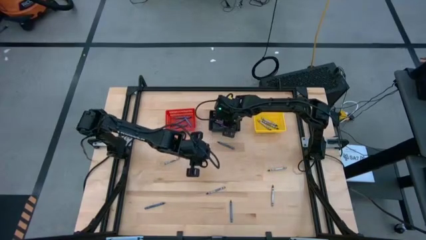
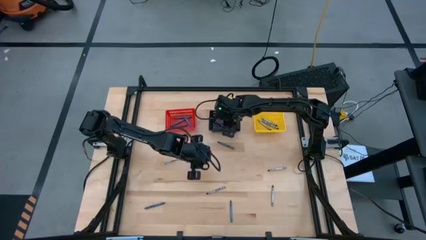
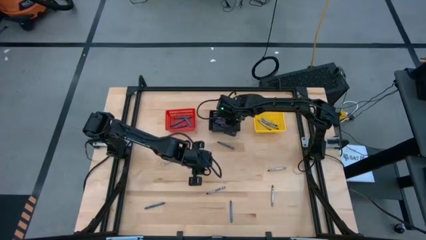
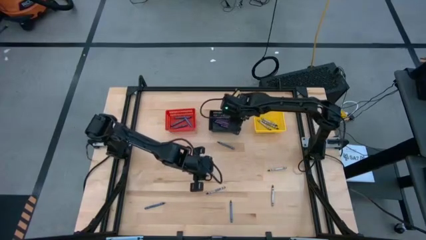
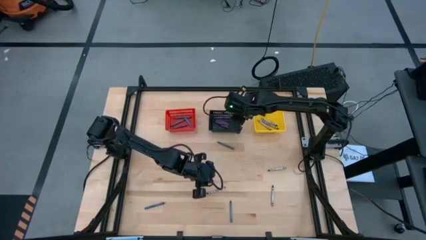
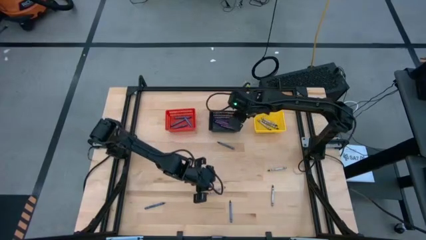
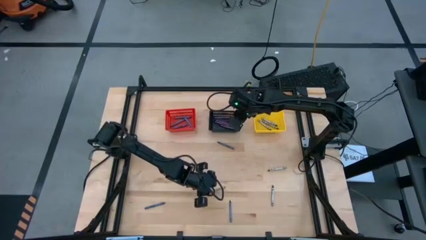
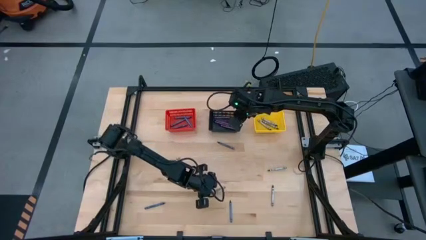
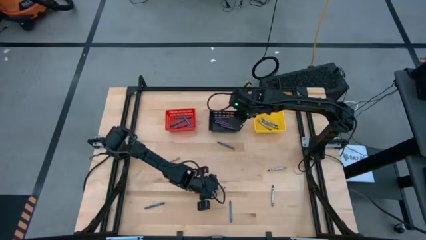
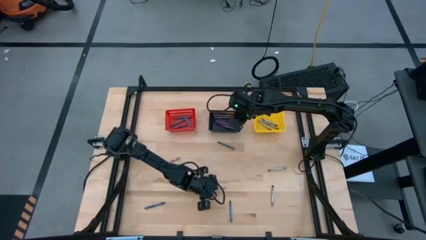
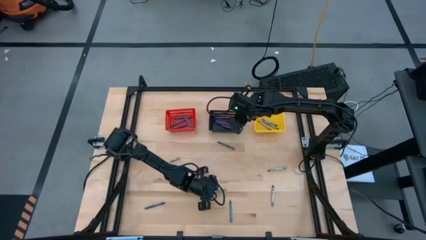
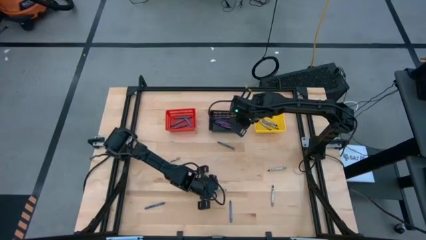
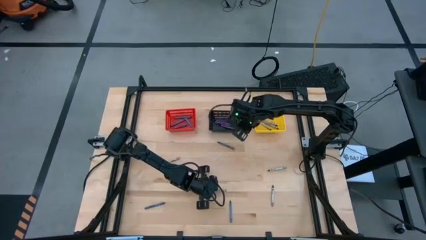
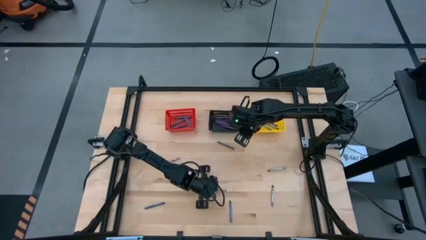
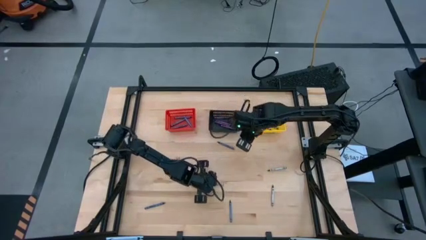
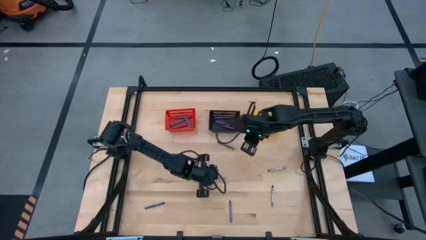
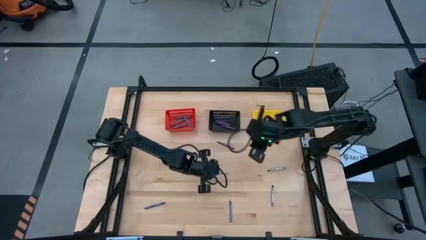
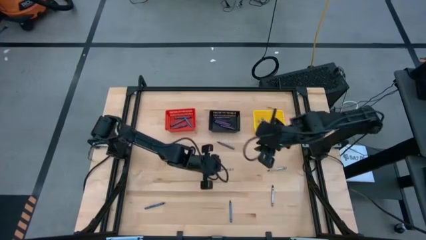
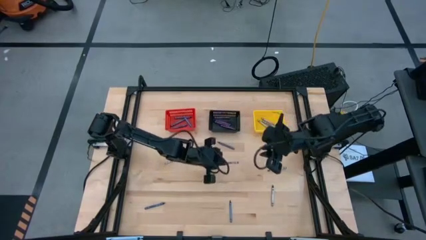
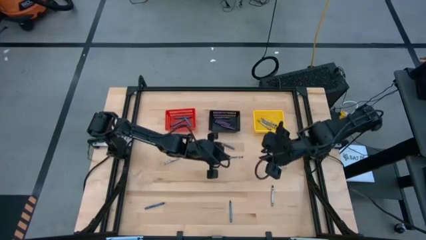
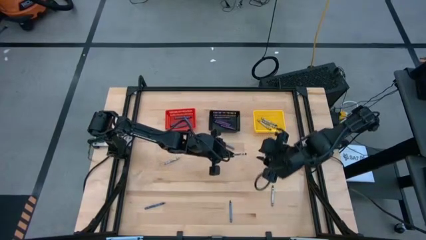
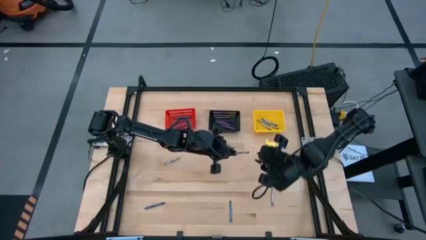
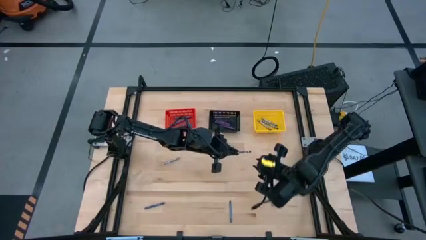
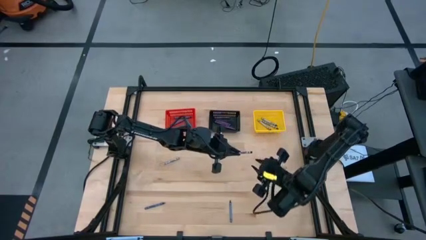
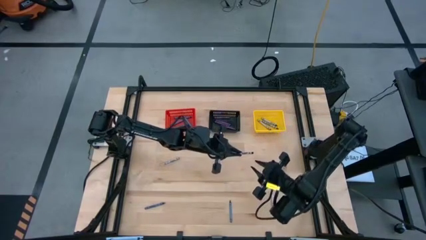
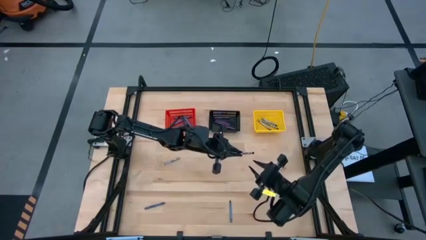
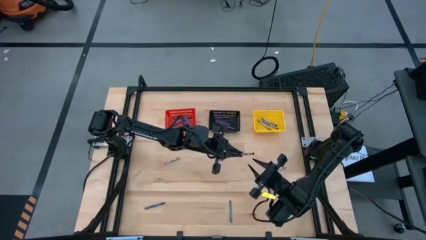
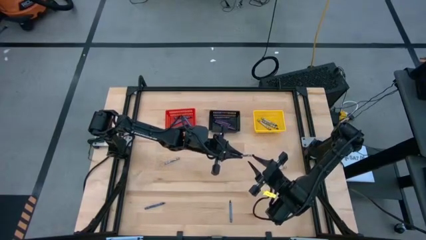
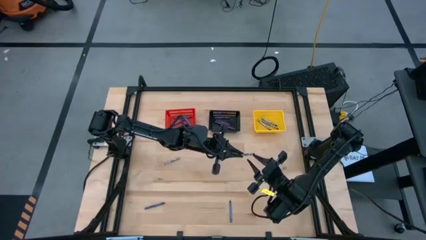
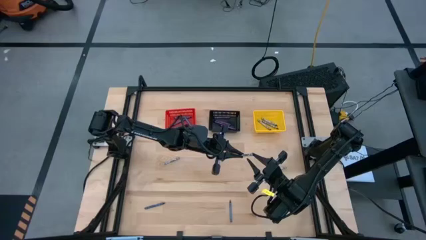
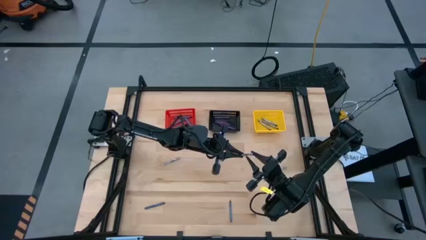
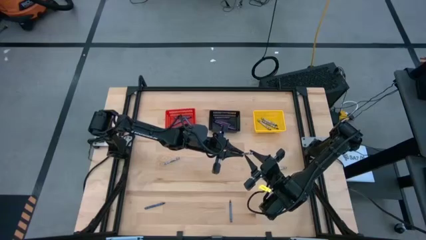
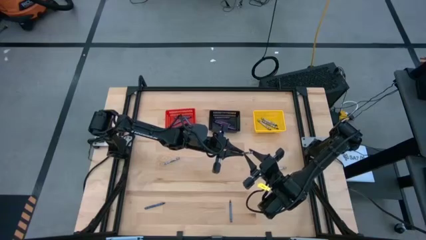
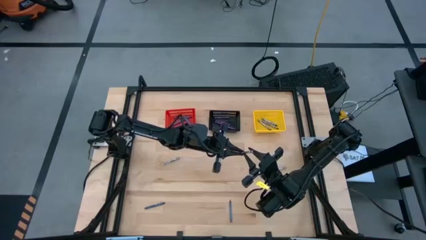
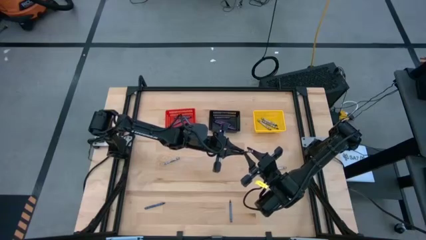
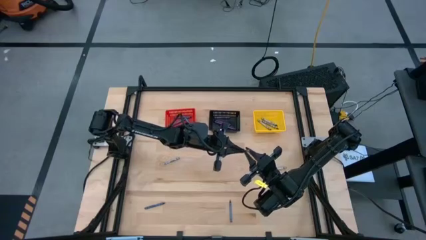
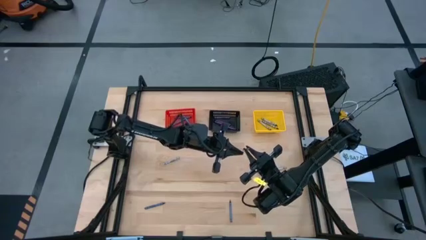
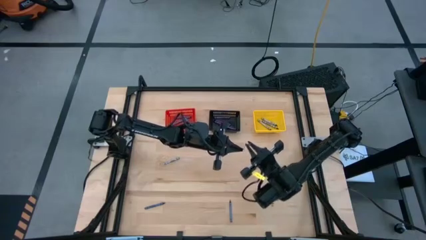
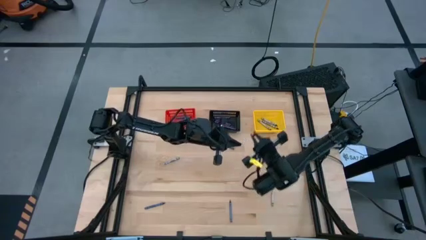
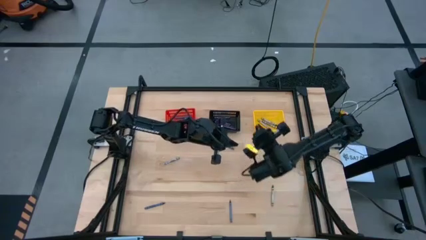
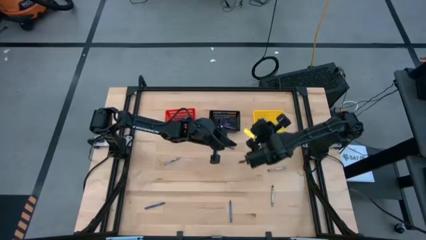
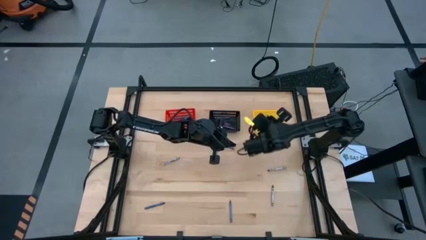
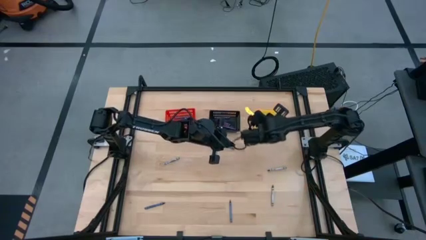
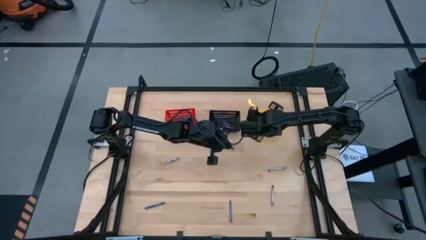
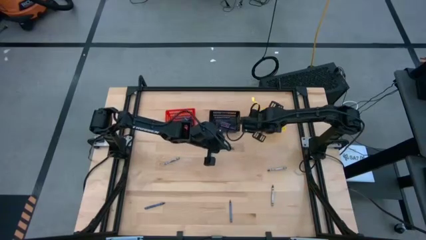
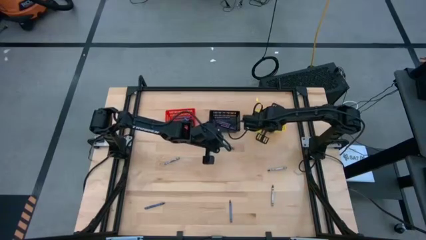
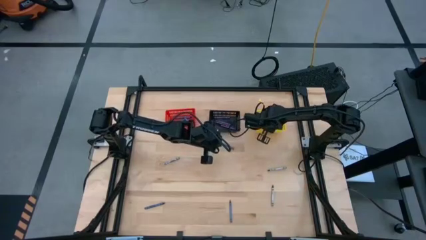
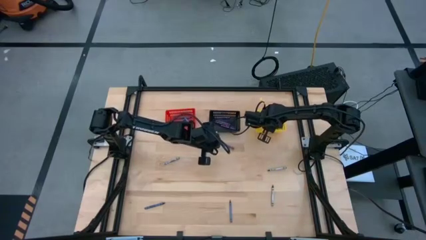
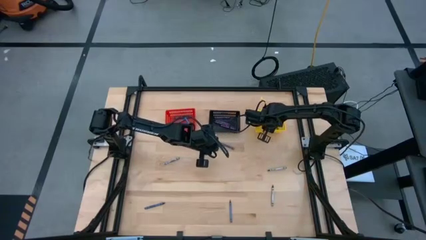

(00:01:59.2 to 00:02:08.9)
Task: Sort crayons
Put the black crayon into the yellow bin

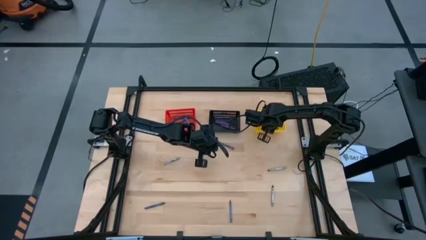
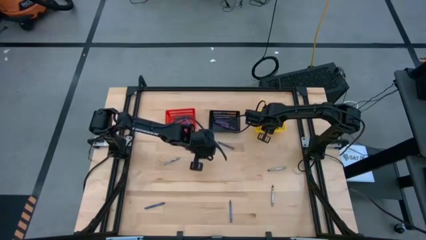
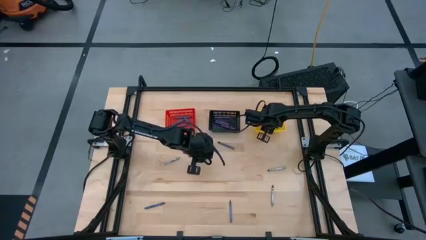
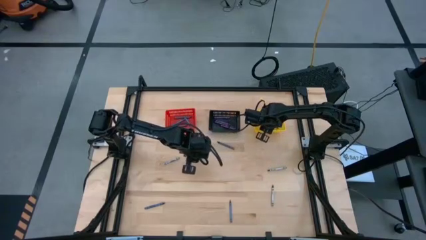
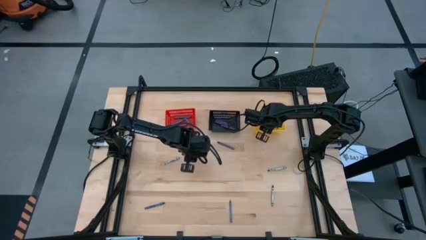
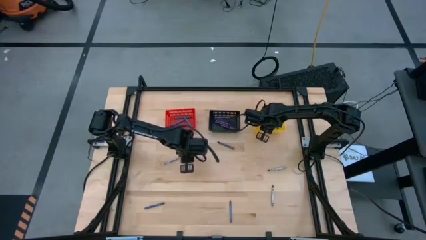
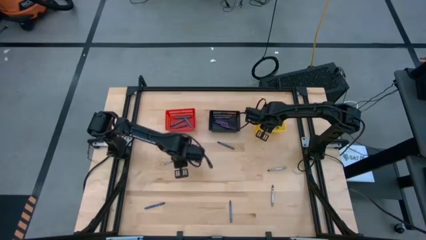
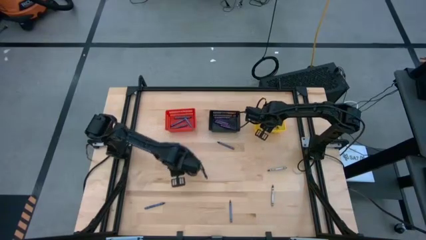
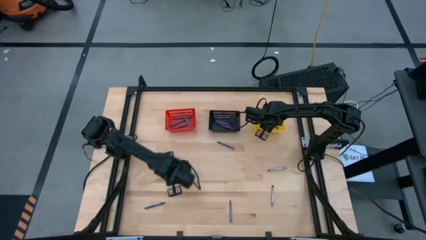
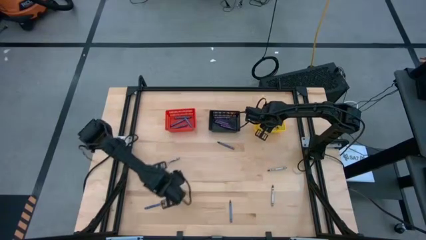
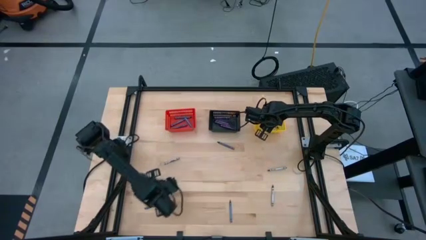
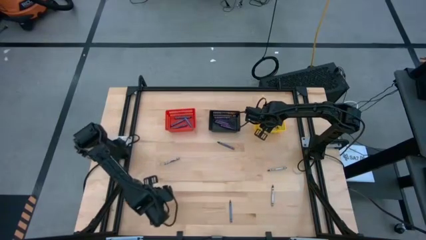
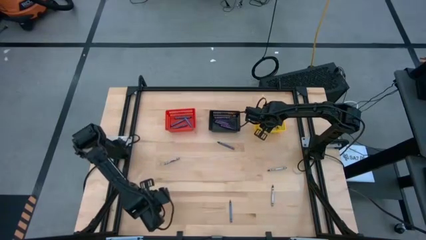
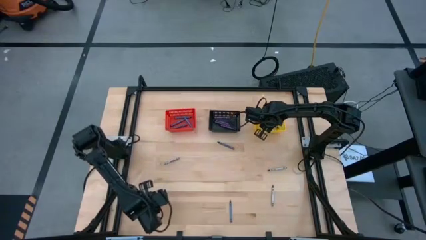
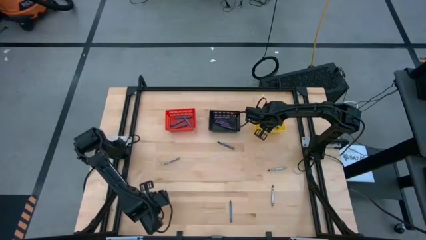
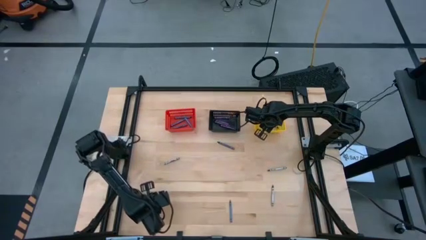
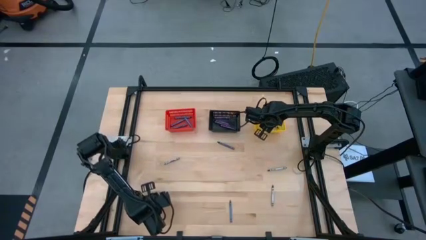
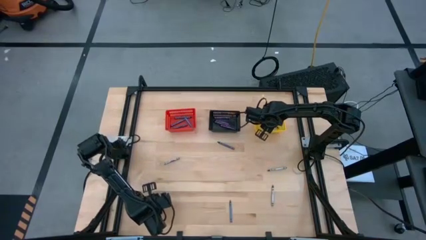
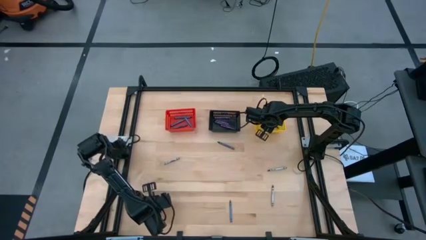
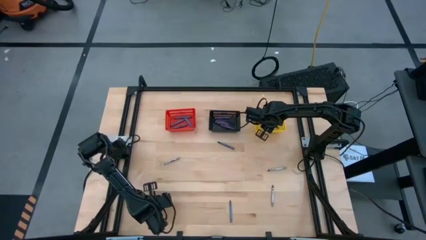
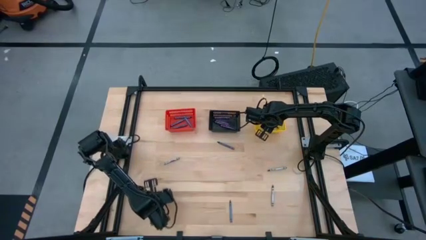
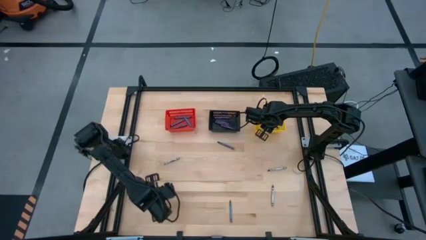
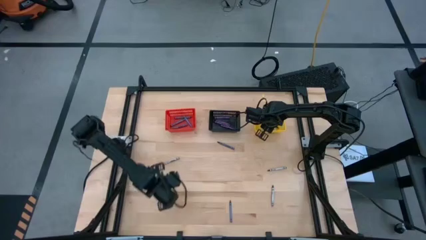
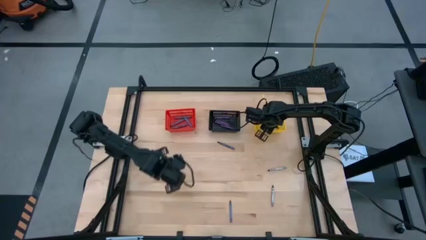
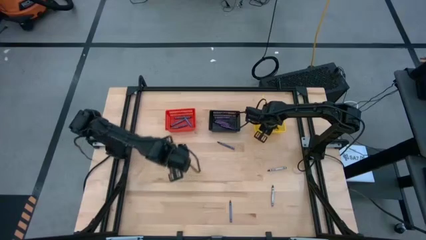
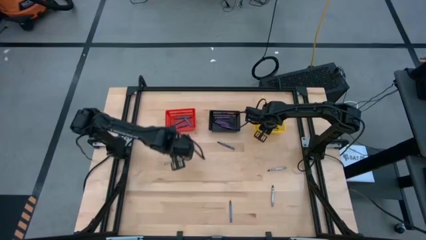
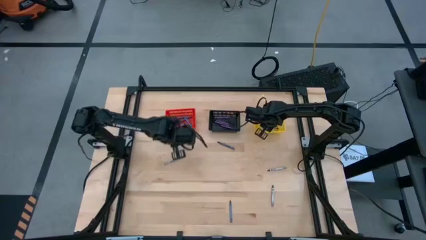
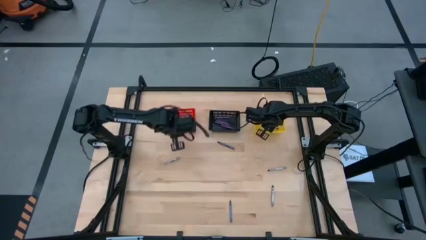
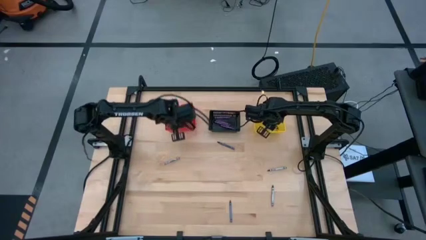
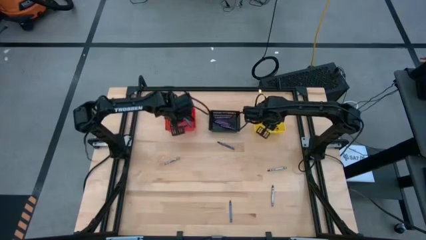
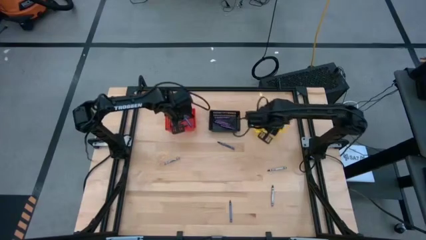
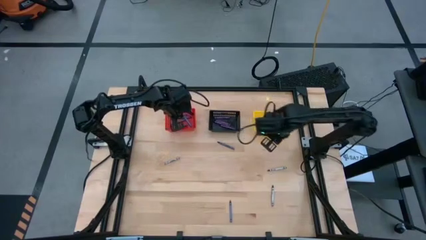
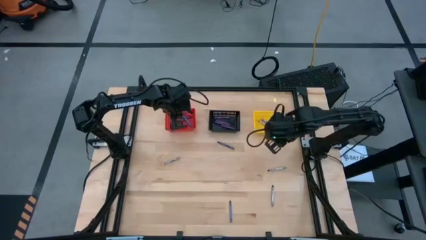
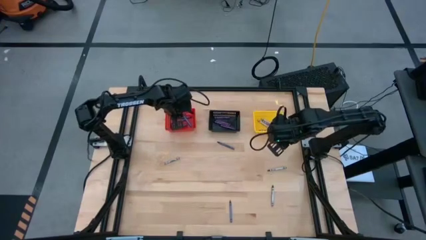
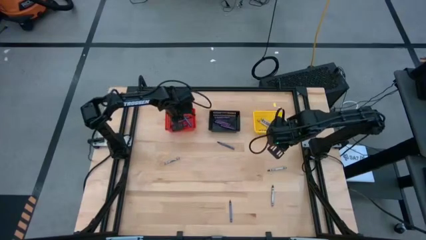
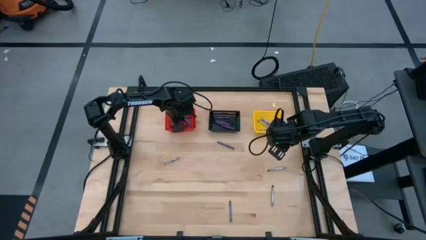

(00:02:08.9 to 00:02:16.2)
Put the blue crayon into the red bin
